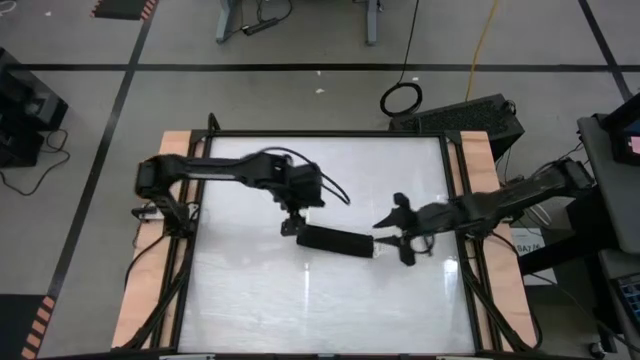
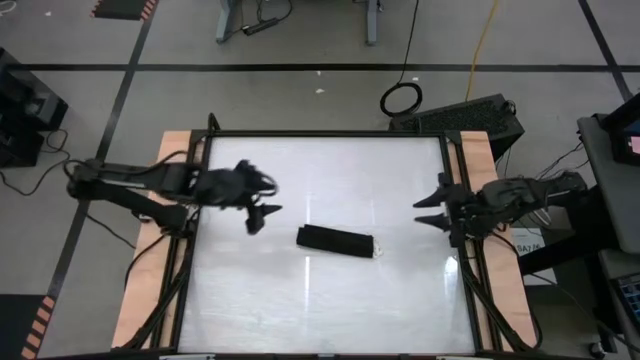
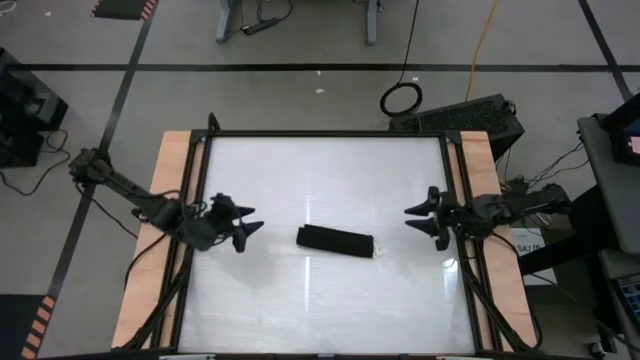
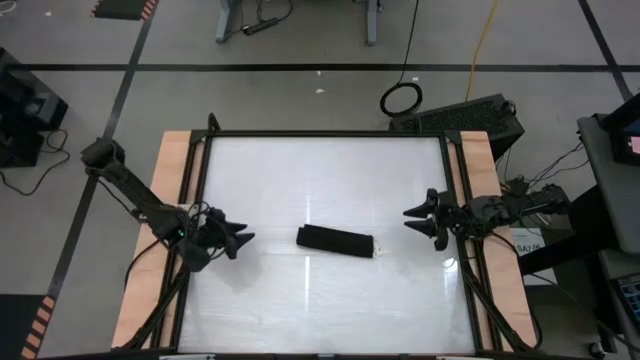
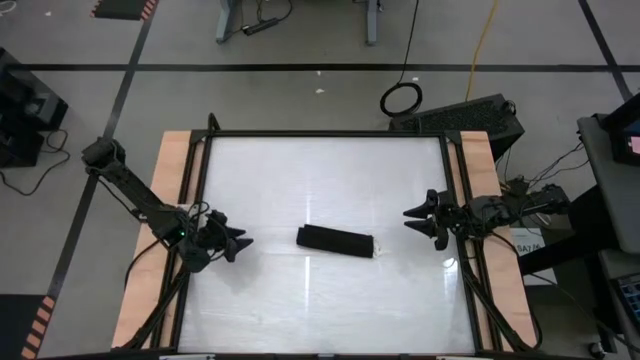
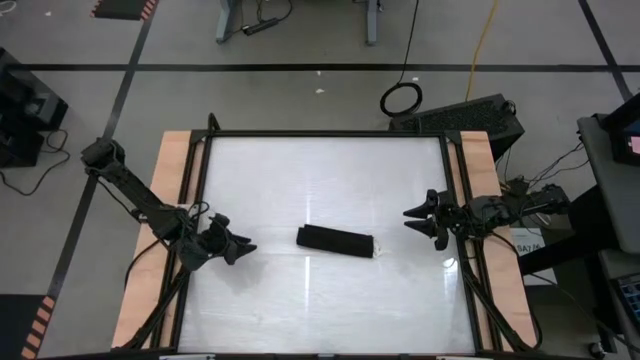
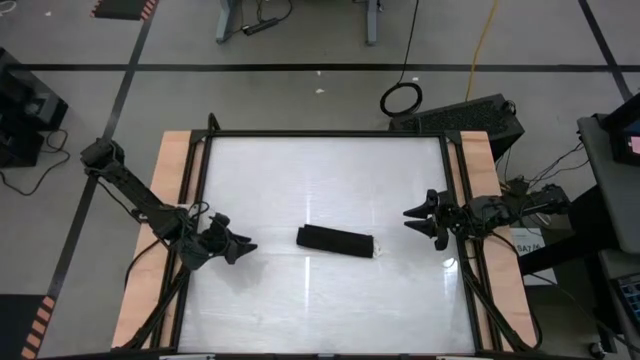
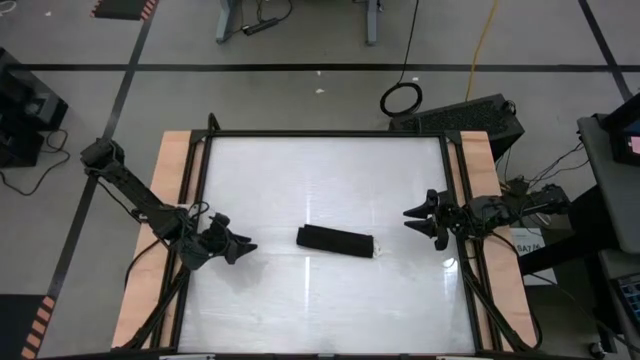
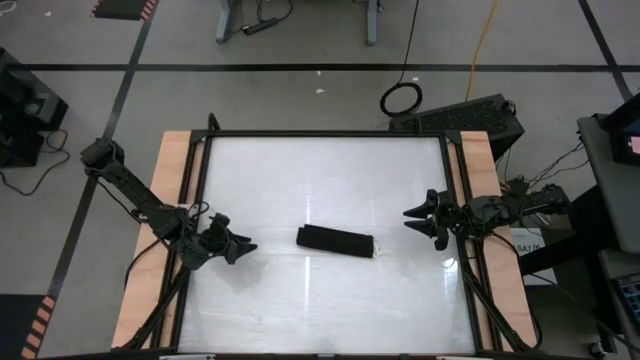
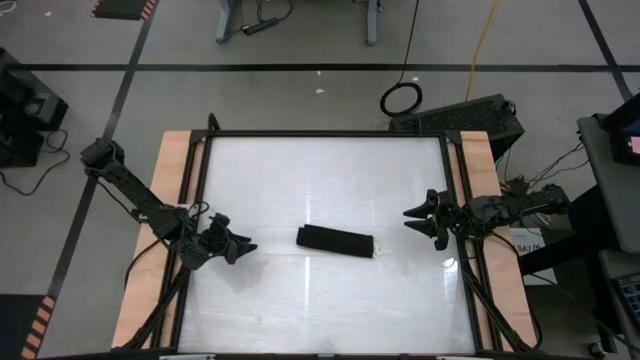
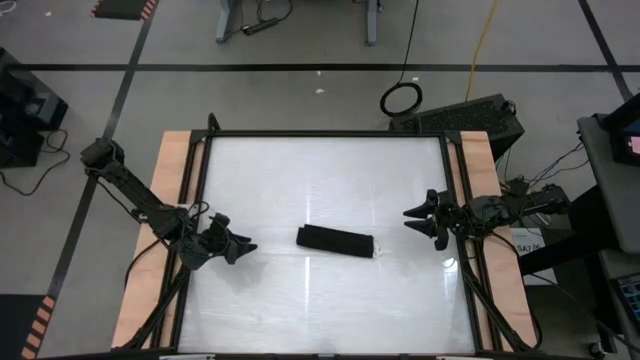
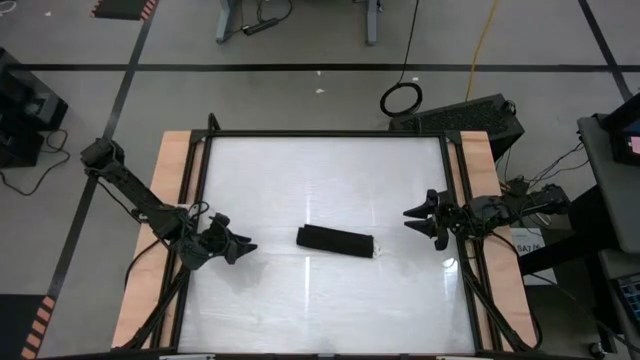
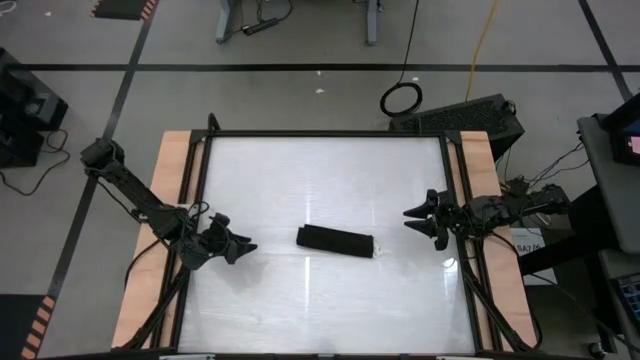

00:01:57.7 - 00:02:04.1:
Task: Roll towel
Return to Home Position

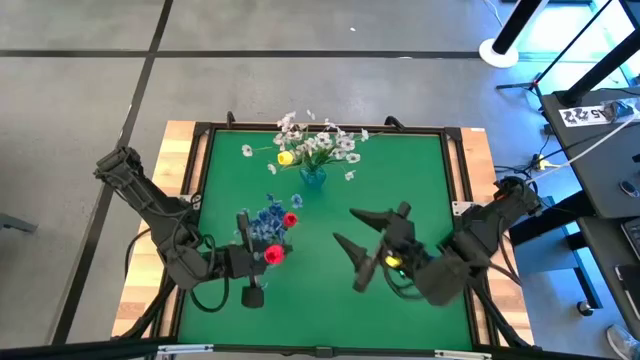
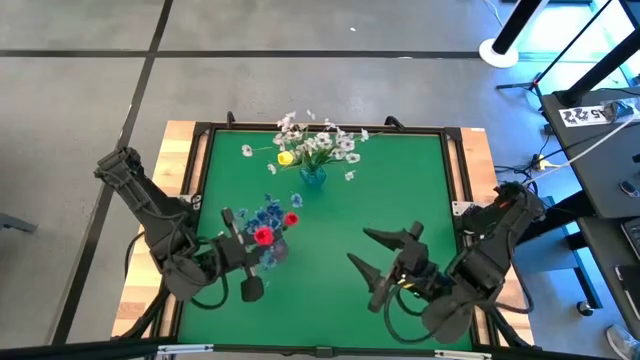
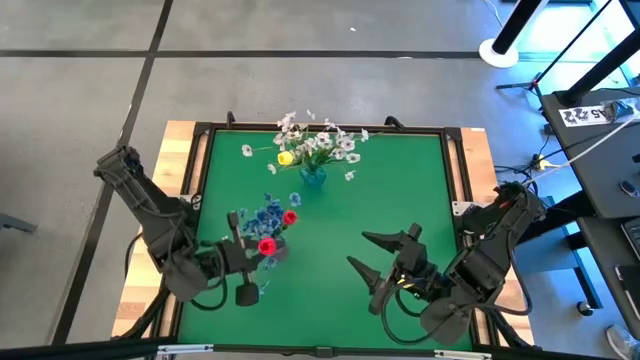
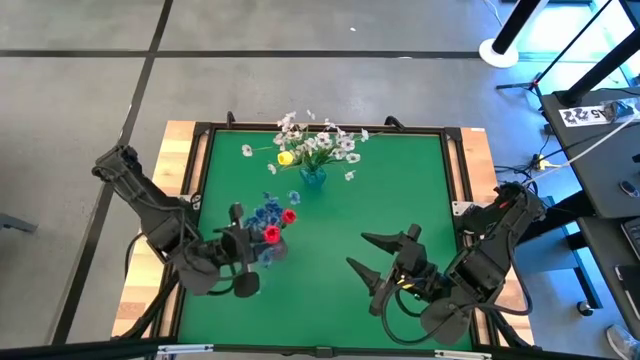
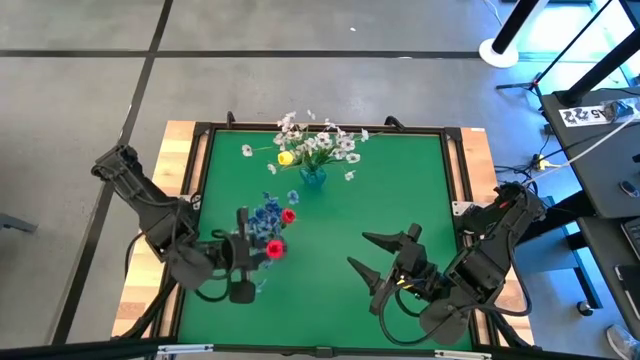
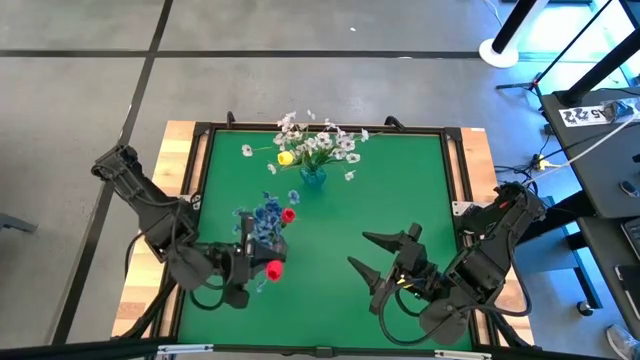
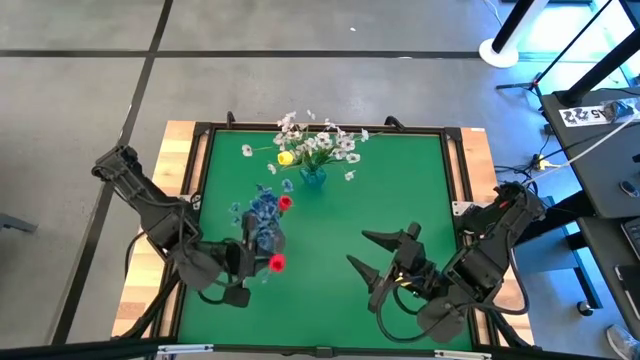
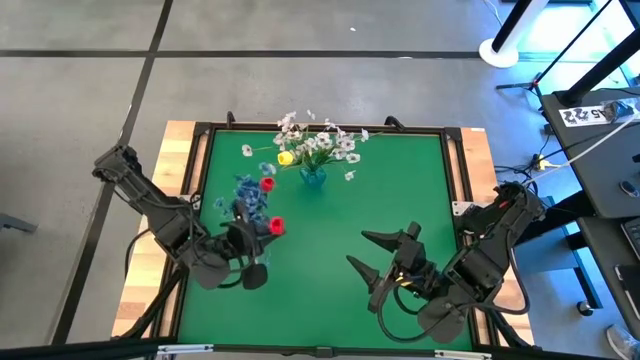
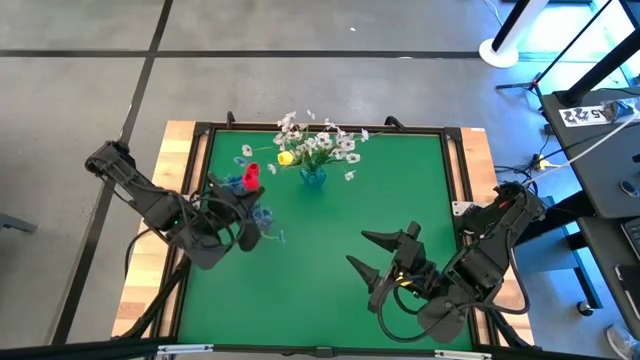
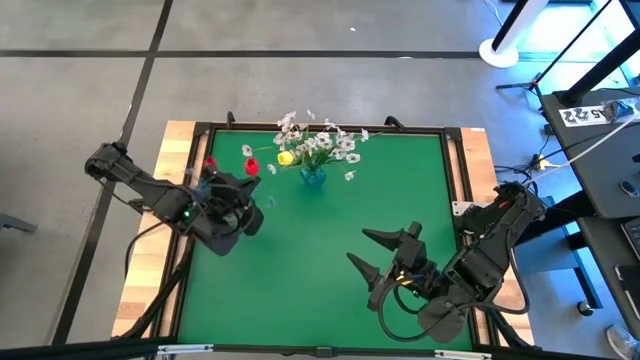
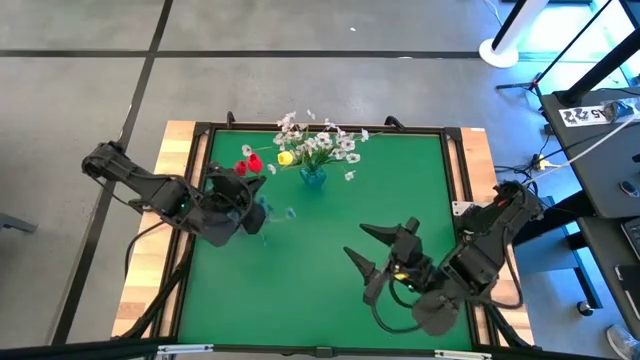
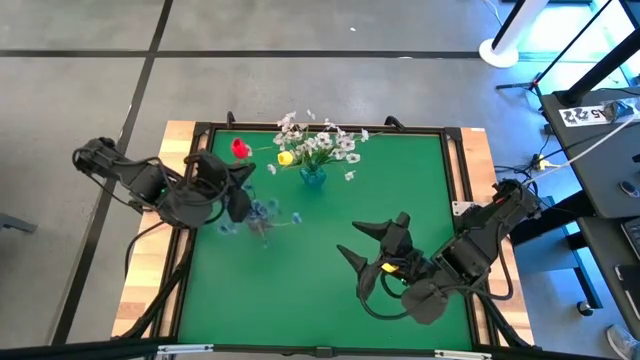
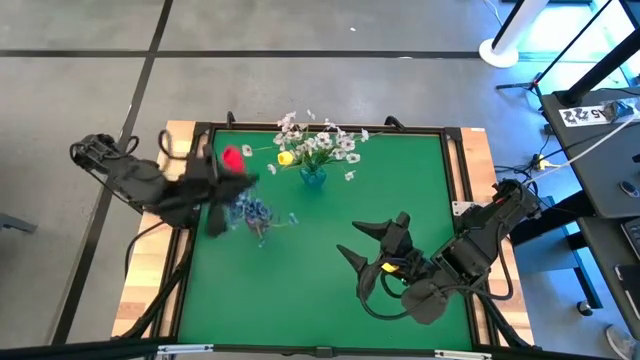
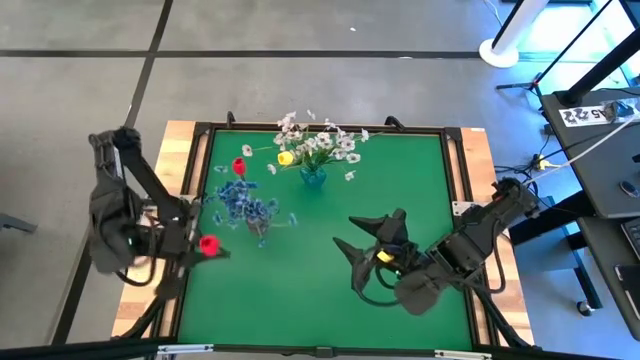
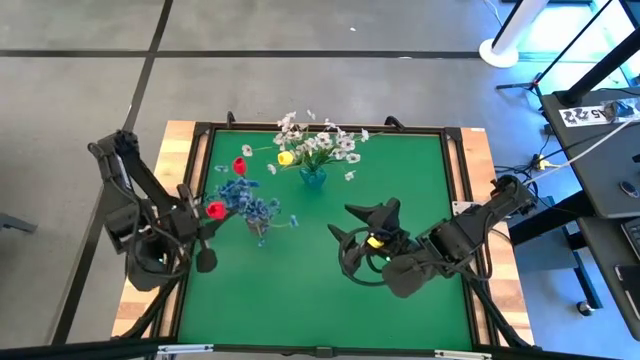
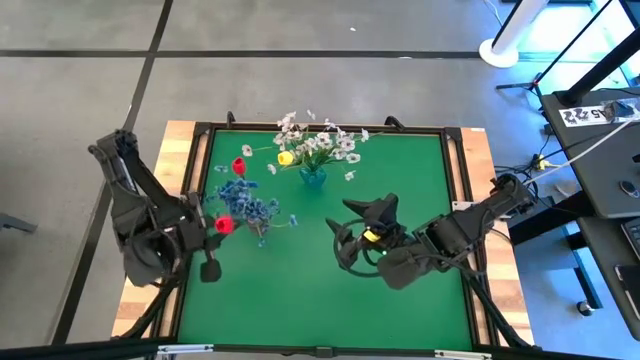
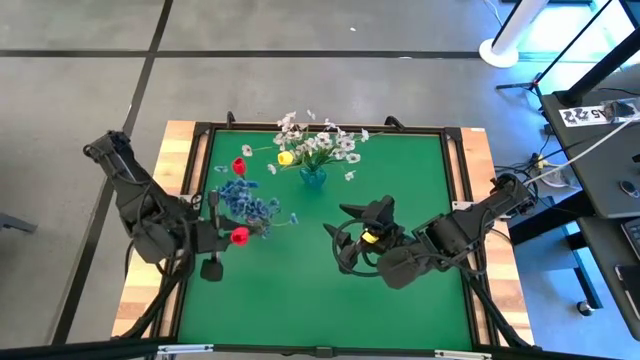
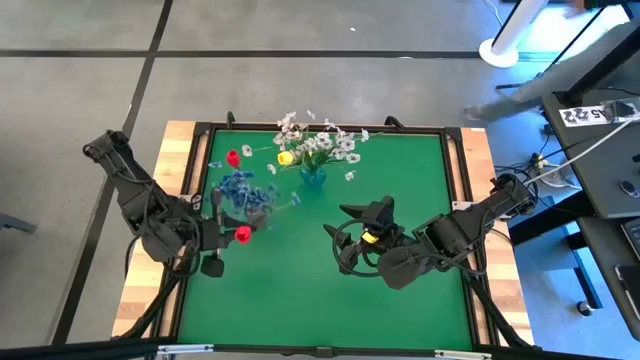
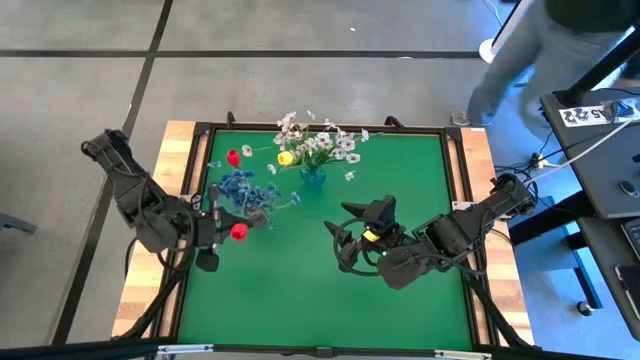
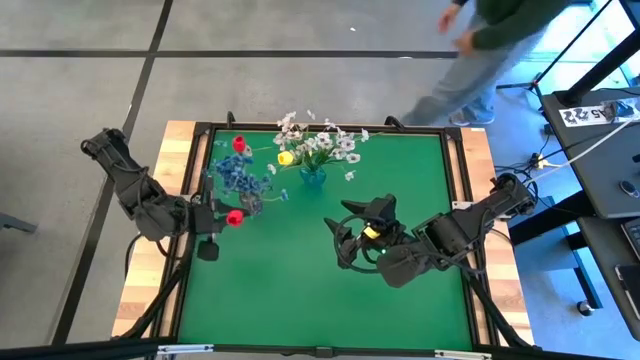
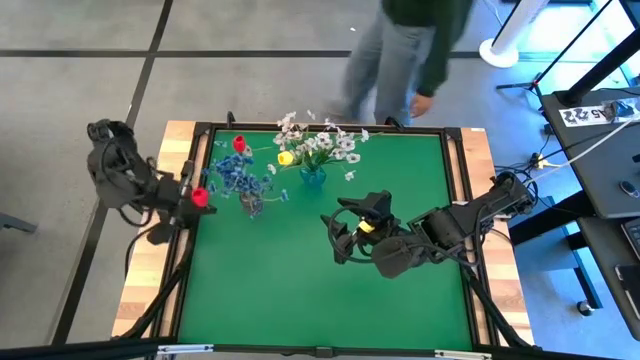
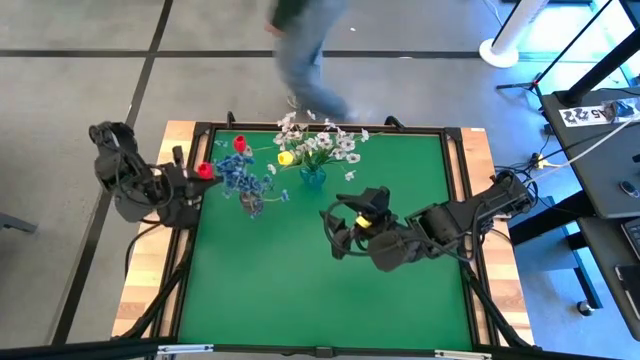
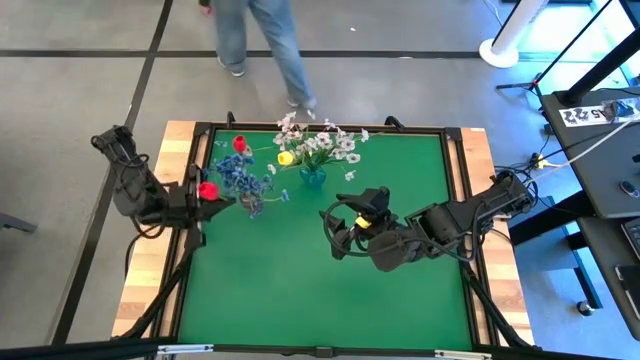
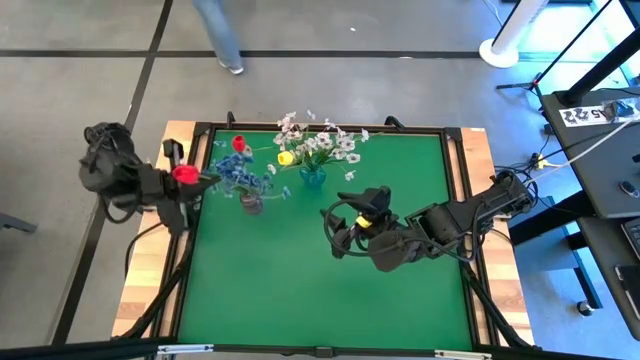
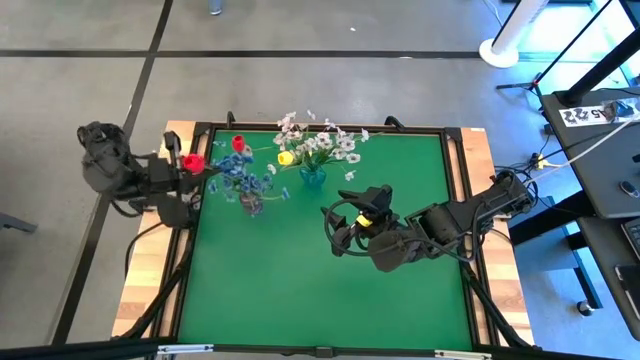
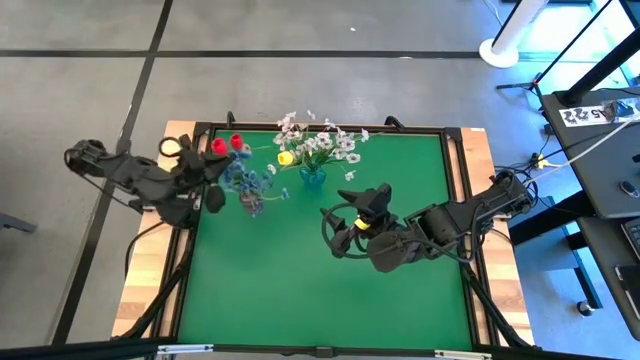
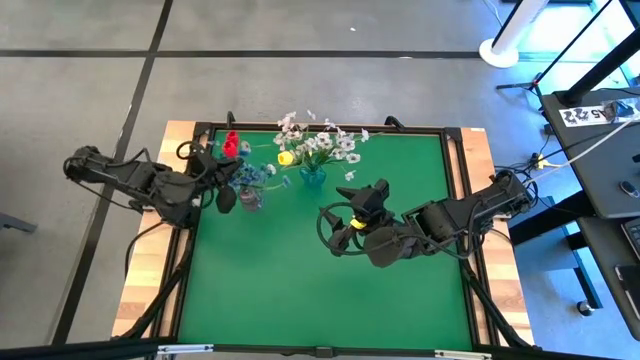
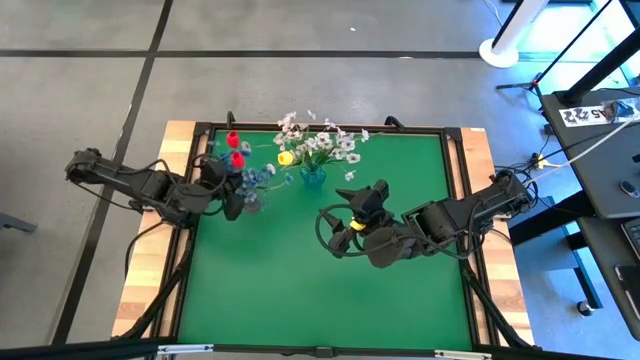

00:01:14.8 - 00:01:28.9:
Task: Sort flowers into vase by color
Put the red flowers into the violet vase
